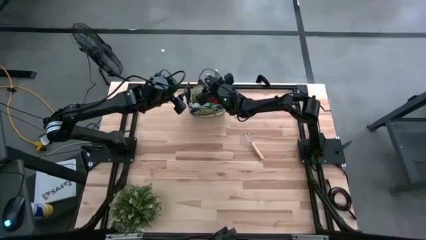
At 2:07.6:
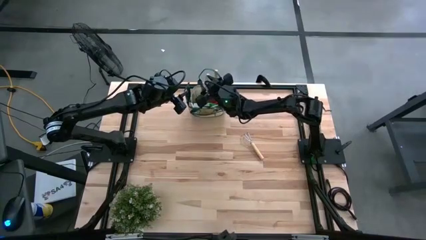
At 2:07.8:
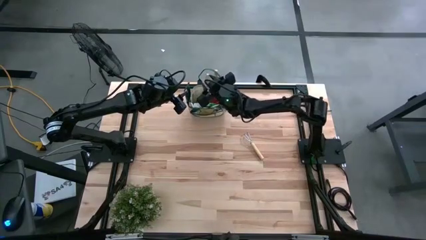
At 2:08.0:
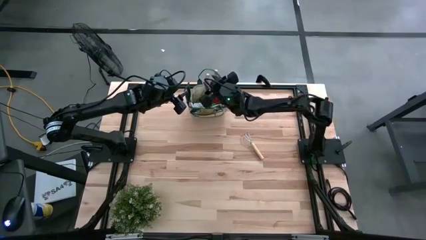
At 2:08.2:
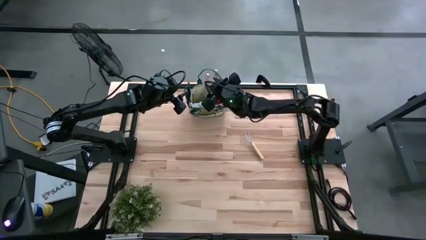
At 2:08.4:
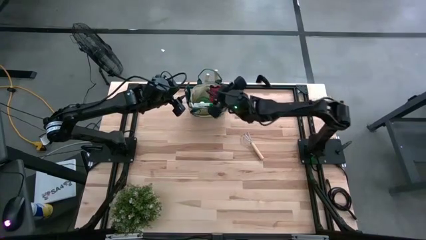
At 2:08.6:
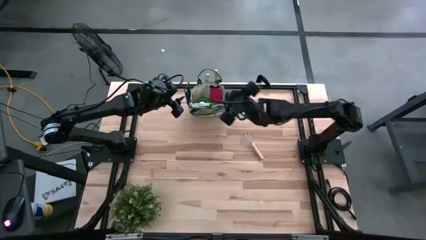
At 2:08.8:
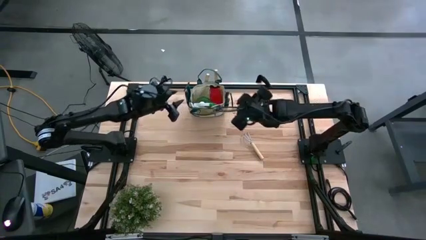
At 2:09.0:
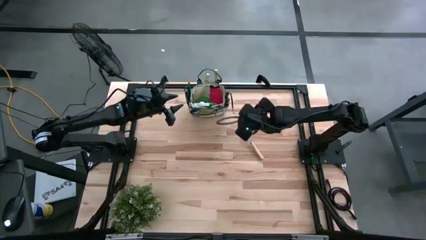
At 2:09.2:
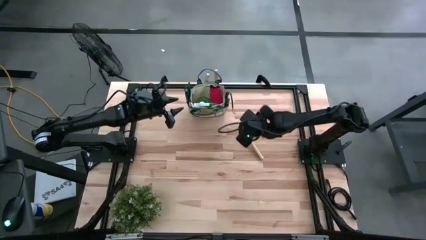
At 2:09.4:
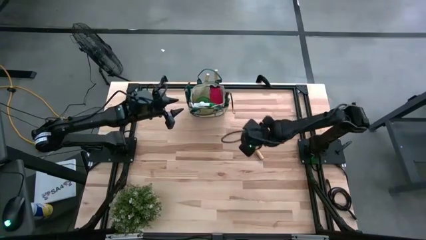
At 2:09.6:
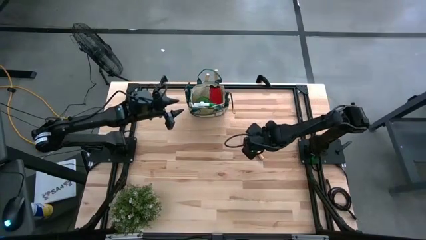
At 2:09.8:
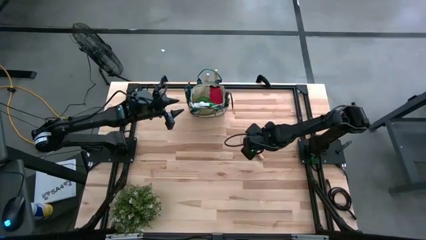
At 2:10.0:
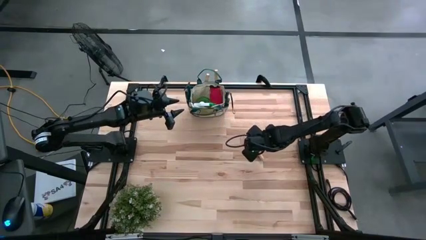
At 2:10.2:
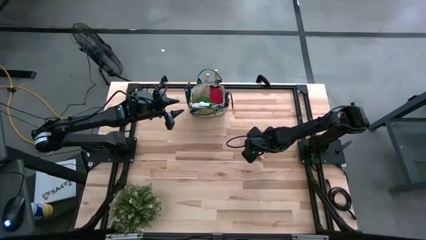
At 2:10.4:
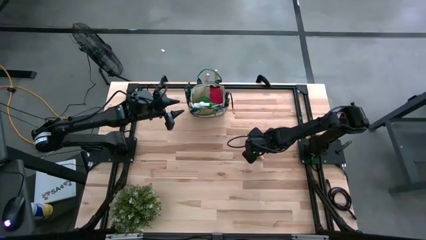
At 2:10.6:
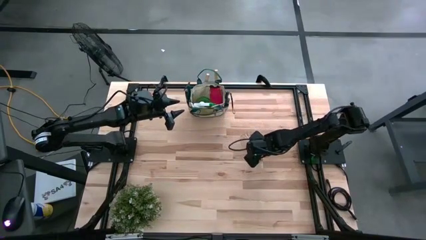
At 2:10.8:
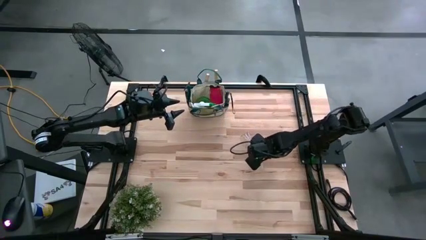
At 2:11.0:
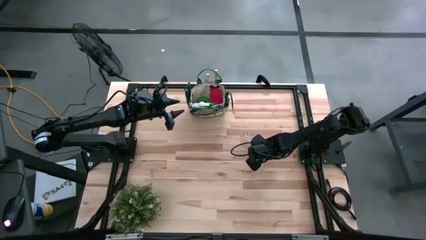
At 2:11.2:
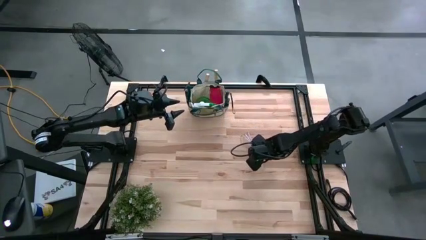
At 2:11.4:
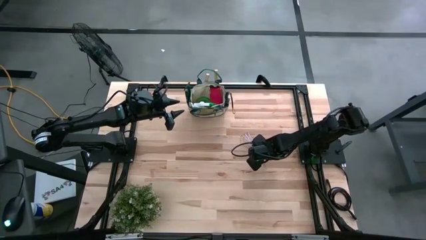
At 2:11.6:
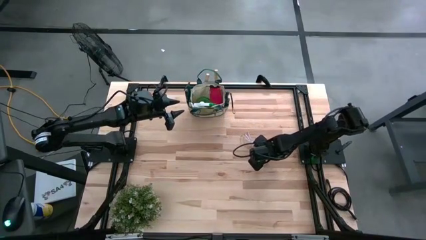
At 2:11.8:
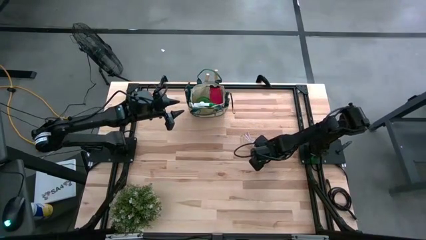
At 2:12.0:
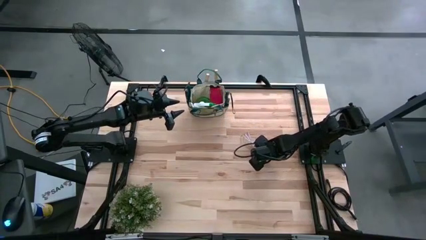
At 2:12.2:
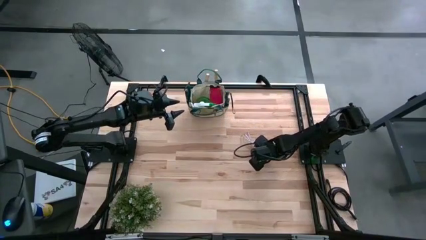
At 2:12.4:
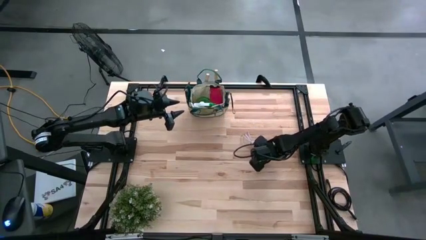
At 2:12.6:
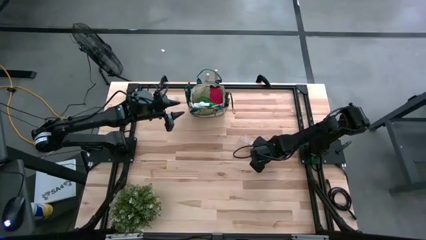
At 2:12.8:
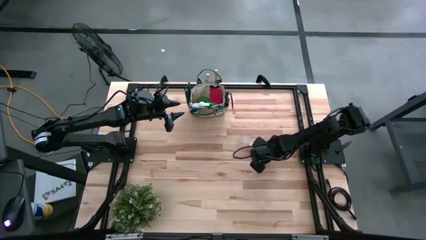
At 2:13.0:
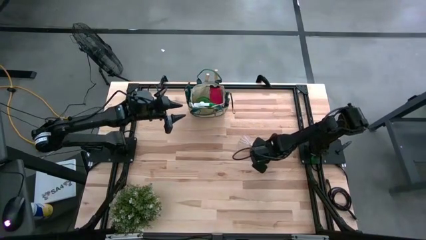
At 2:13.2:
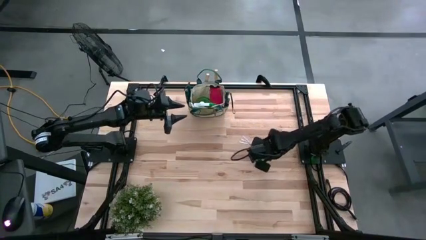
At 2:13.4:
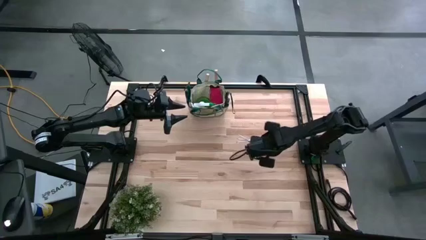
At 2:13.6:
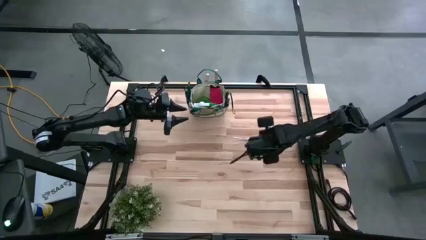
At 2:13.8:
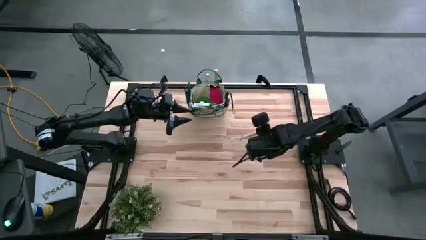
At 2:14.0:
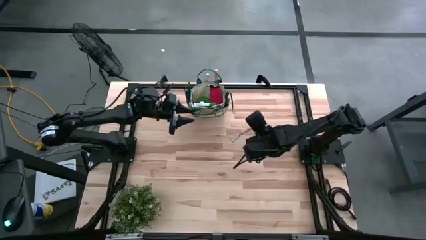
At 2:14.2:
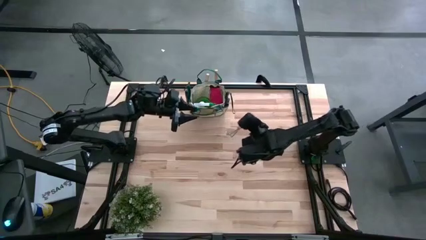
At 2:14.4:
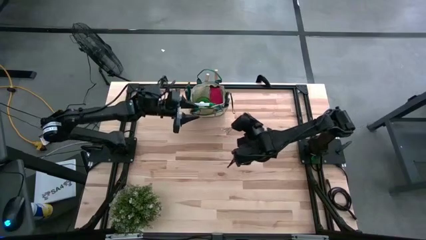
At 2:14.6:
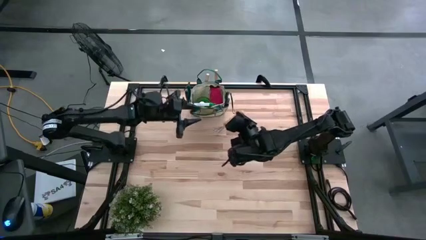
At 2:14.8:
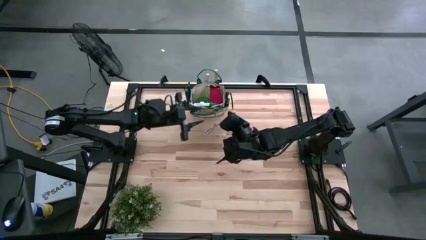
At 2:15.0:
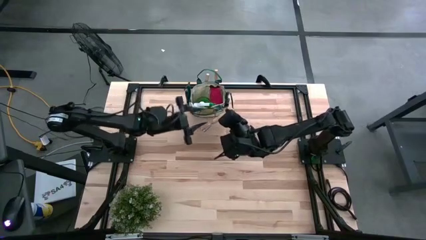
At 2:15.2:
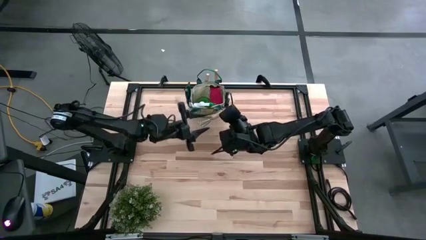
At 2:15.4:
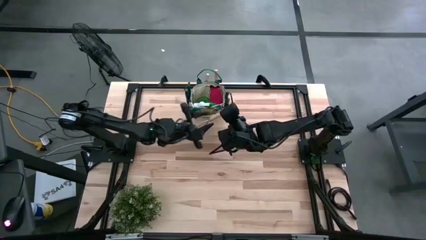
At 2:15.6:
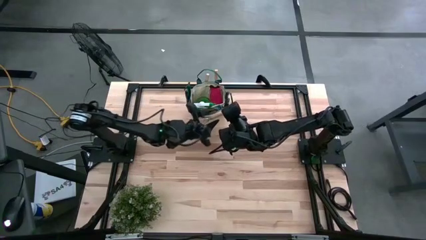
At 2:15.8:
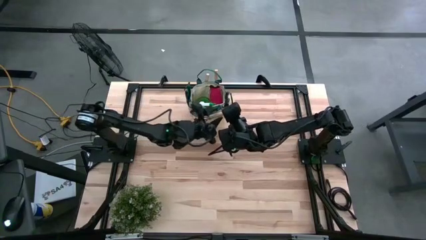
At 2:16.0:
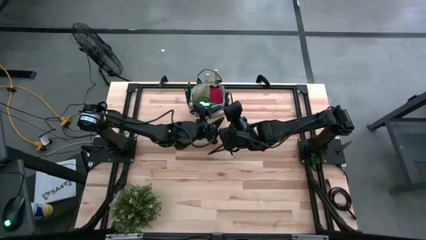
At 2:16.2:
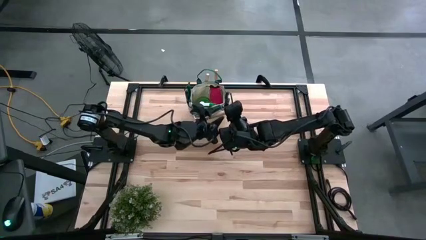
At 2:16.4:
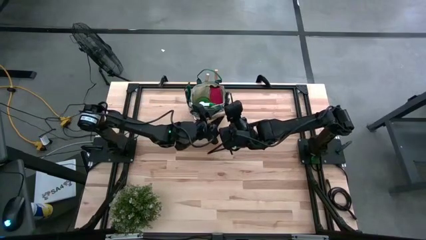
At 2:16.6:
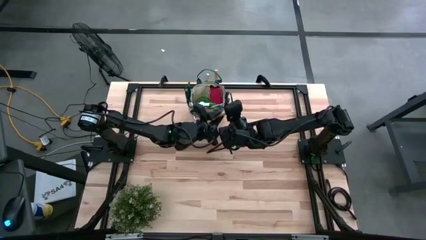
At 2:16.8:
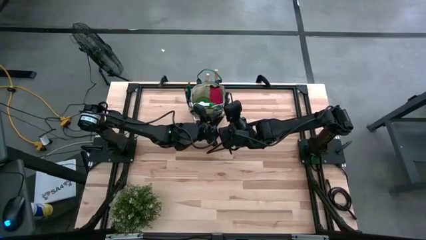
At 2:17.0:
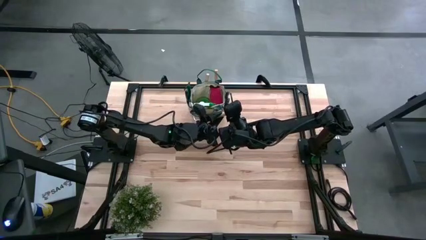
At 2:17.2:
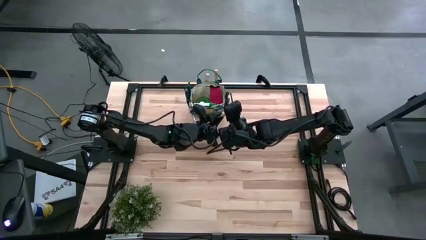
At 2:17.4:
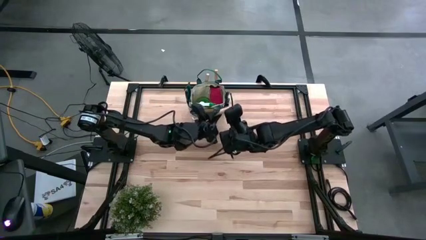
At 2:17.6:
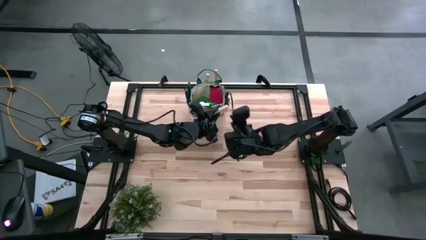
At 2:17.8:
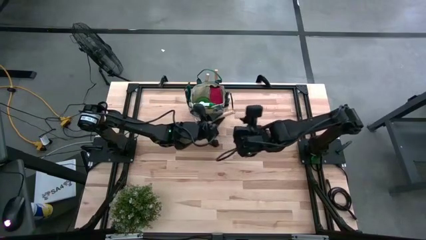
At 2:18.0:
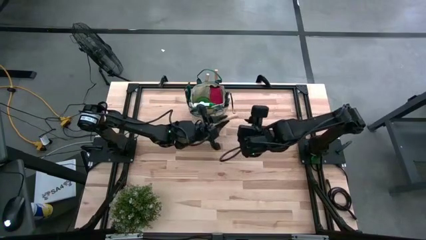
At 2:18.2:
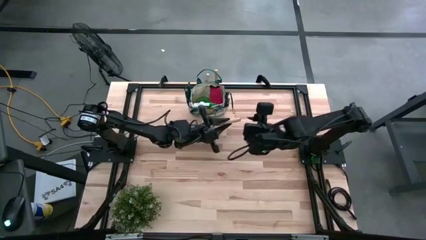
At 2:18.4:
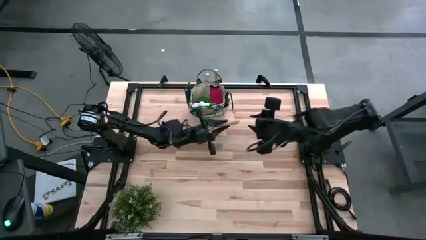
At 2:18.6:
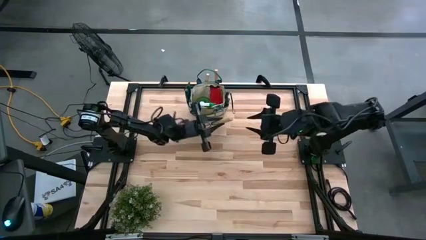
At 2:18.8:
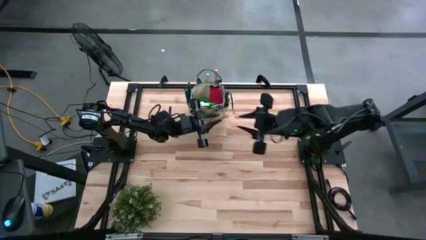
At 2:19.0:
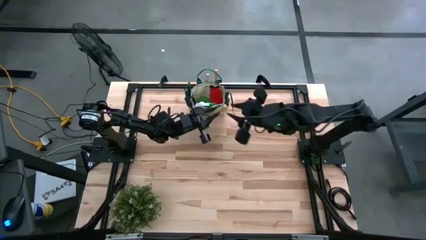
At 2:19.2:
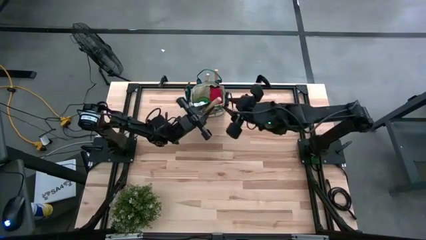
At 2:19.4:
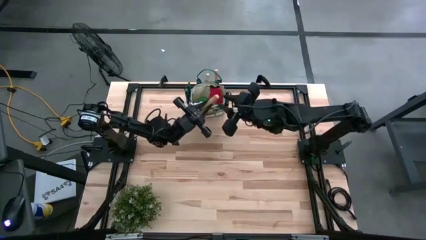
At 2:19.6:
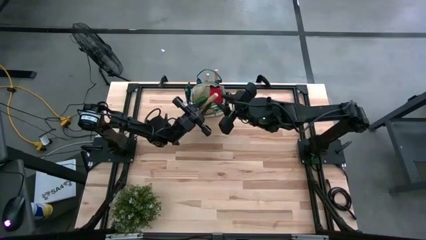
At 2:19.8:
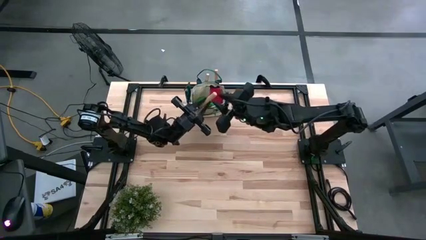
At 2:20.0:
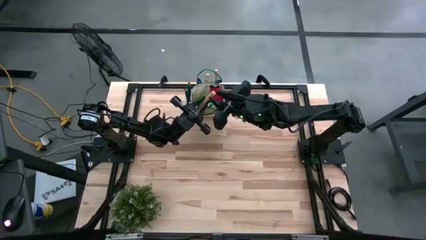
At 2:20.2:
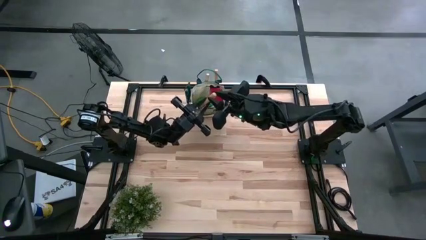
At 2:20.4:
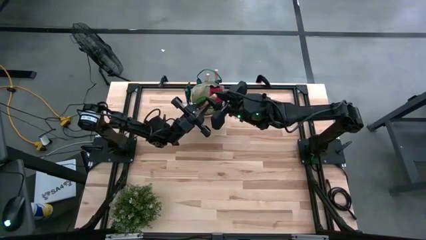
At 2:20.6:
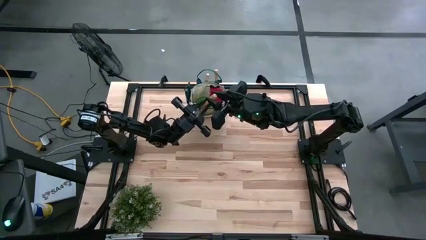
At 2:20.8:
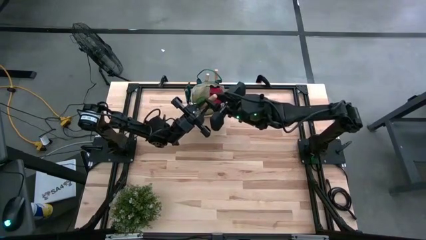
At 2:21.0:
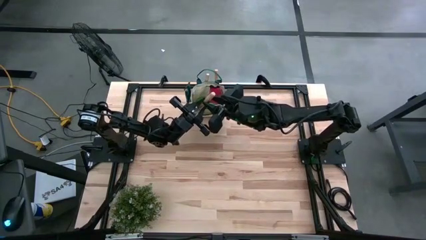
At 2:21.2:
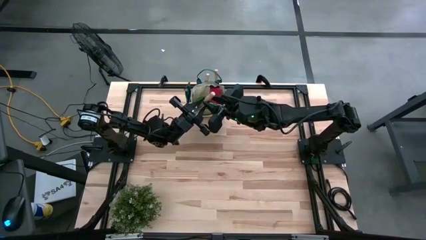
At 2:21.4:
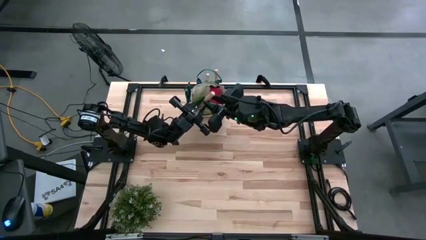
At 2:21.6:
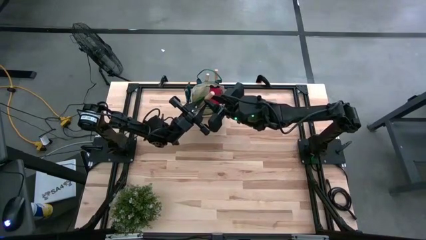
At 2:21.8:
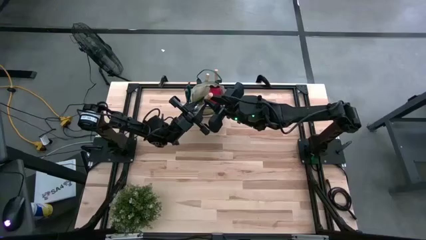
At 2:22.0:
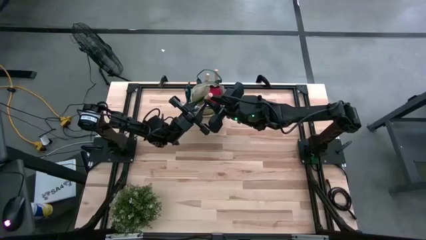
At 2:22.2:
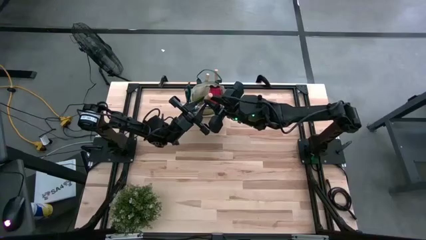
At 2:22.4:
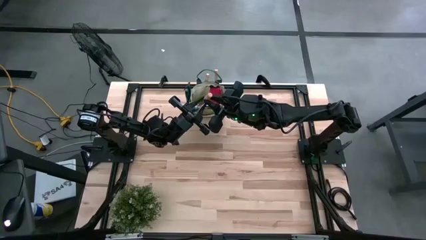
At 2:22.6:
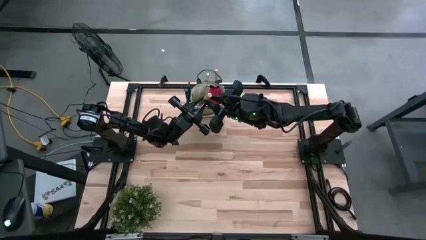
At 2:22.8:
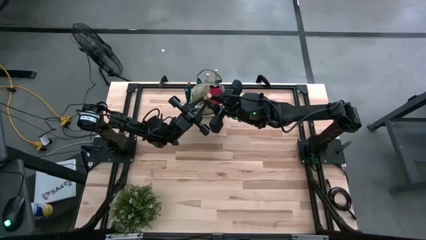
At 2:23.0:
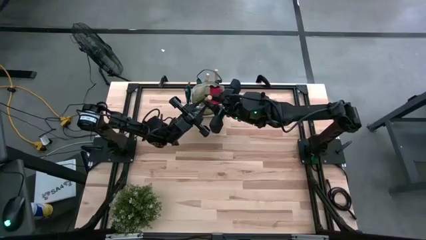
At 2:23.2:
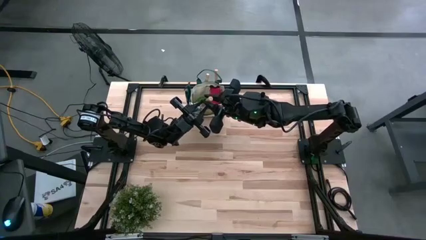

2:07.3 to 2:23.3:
Task: Pick & Place Garden tools in Gardening bag
Put the brown hand rake into the gardening bag
